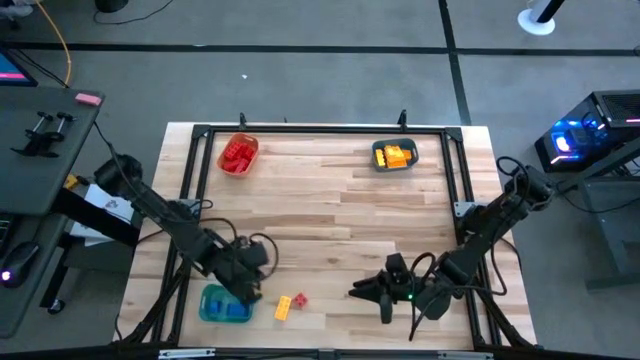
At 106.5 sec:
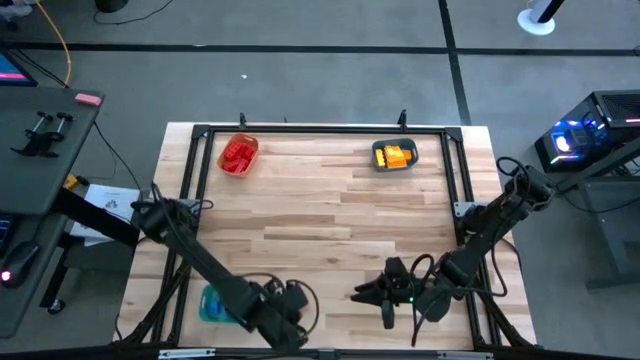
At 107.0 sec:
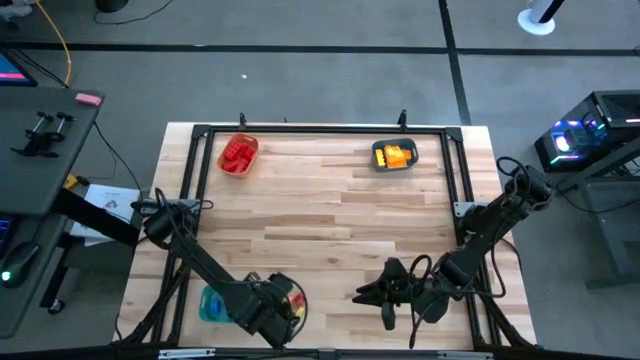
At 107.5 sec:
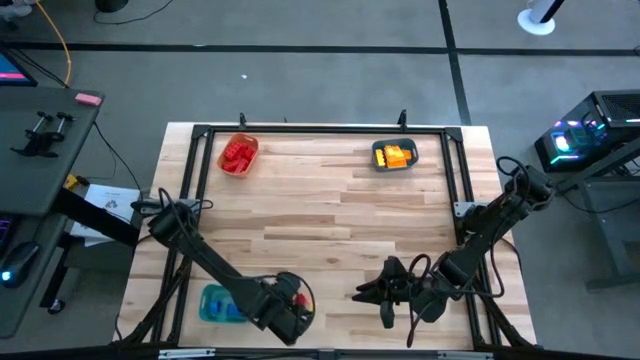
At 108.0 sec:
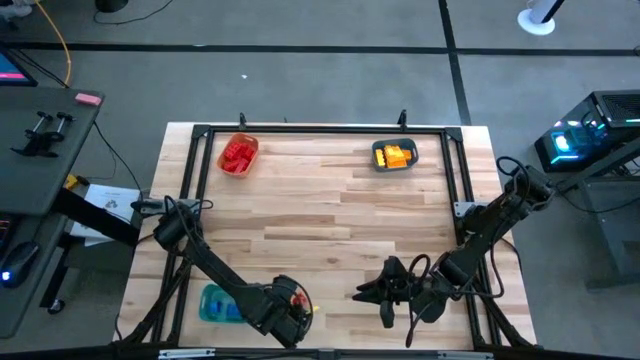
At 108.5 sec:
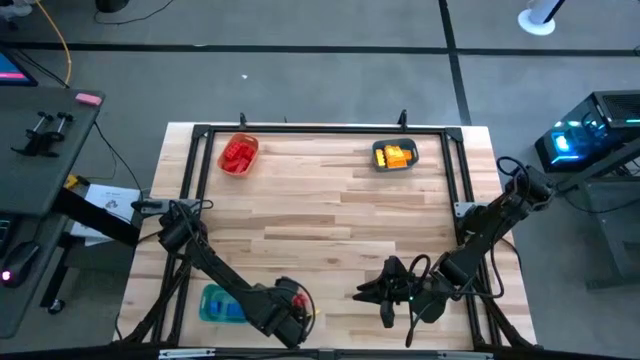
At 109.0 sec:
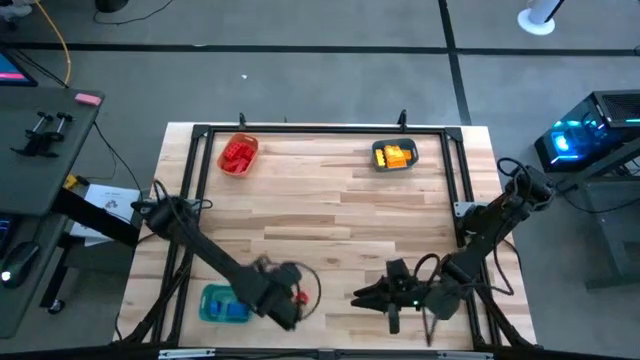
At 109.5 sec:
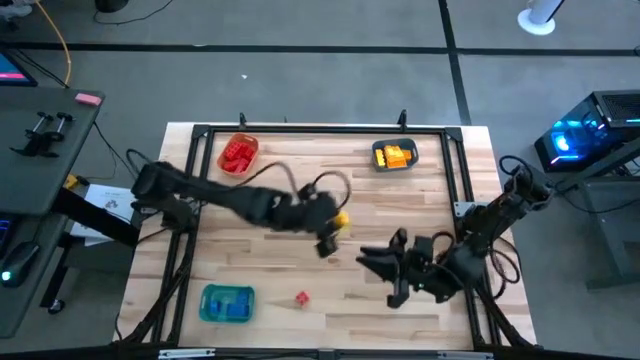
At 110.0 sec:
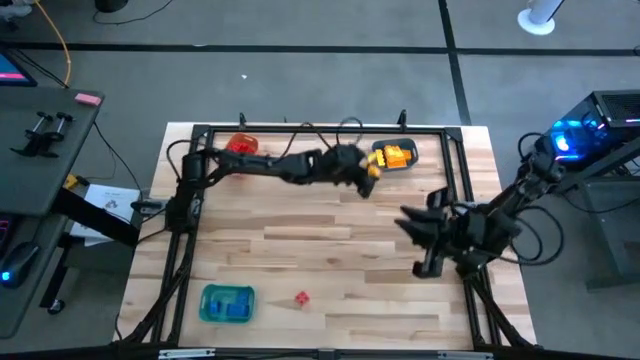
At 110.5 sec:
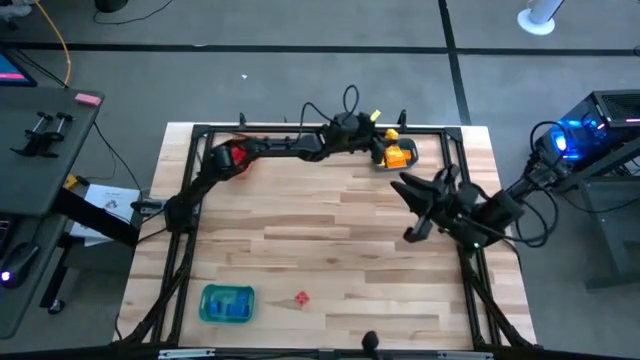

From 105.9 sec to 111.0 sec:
Task: Sort blocks
Put the yellow game piece into the blue bin

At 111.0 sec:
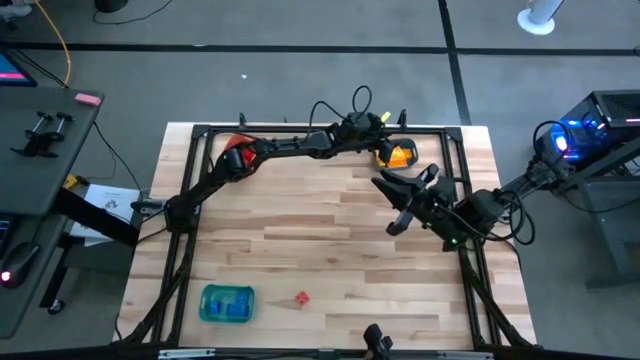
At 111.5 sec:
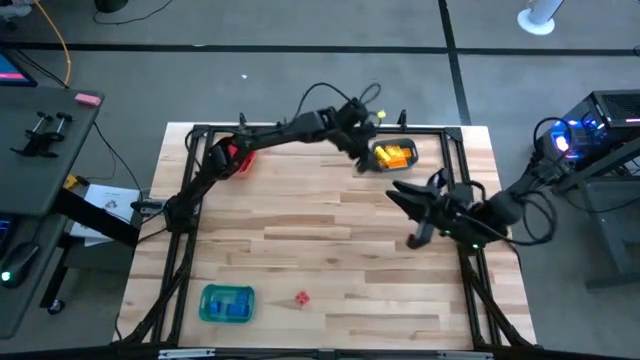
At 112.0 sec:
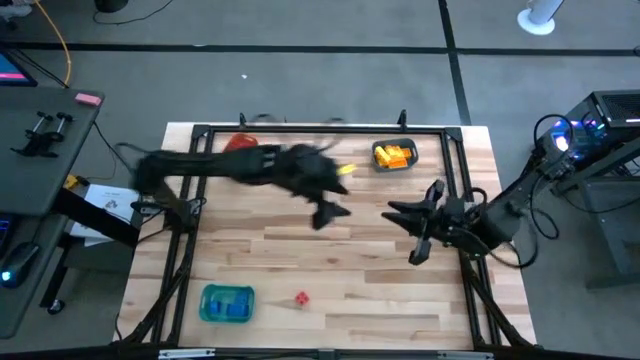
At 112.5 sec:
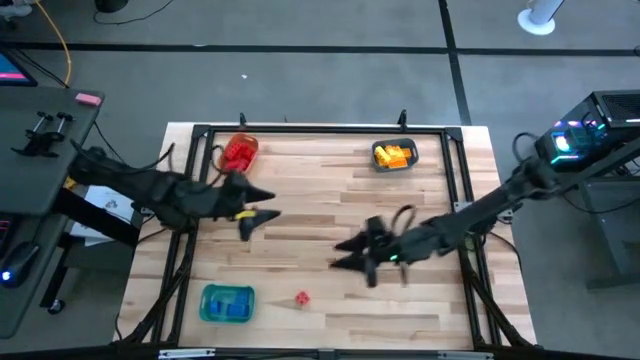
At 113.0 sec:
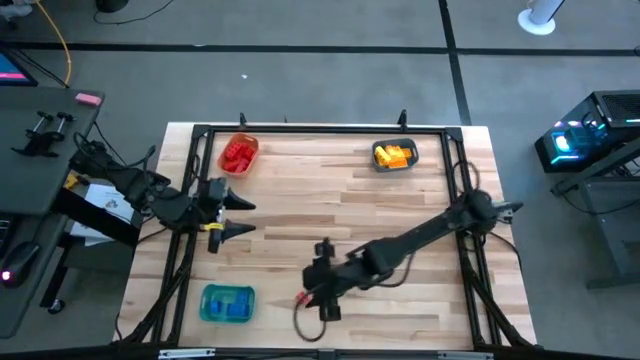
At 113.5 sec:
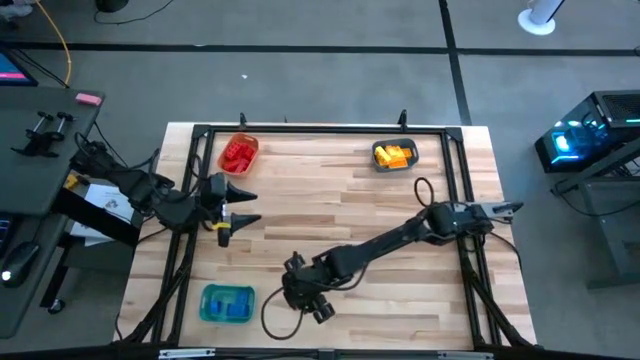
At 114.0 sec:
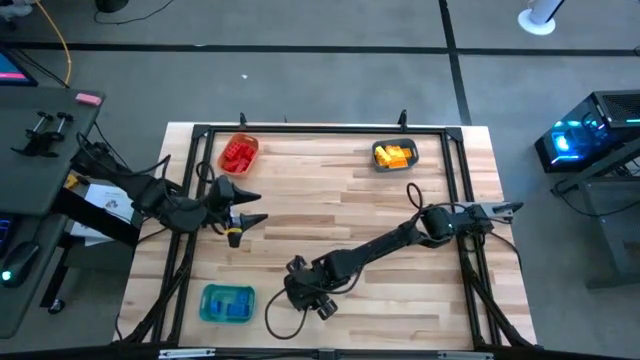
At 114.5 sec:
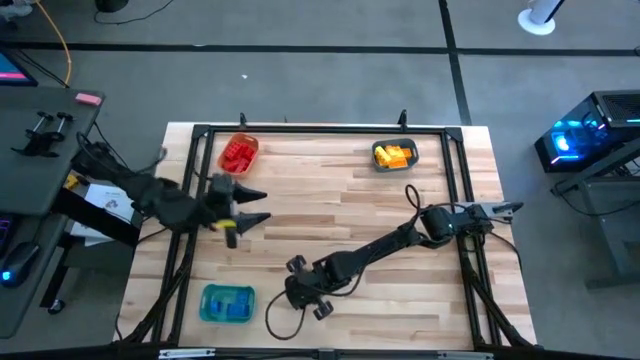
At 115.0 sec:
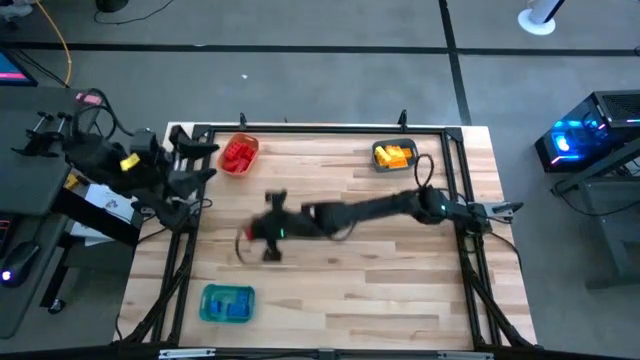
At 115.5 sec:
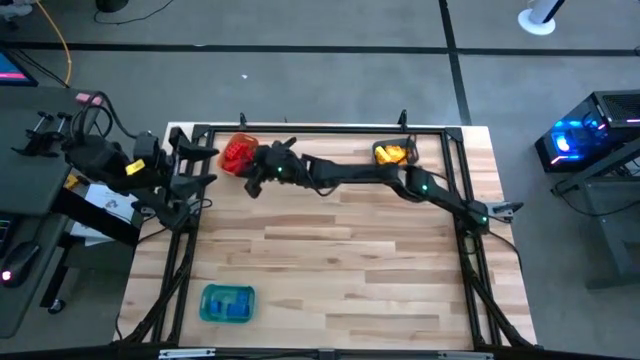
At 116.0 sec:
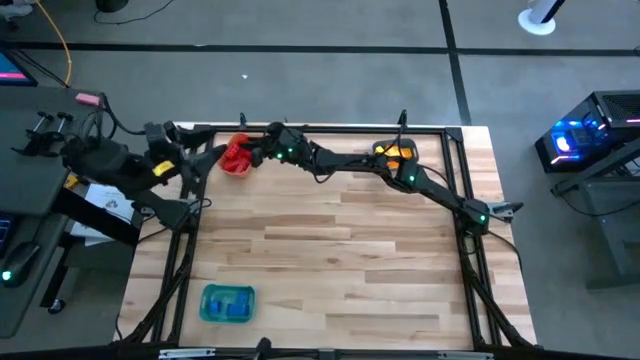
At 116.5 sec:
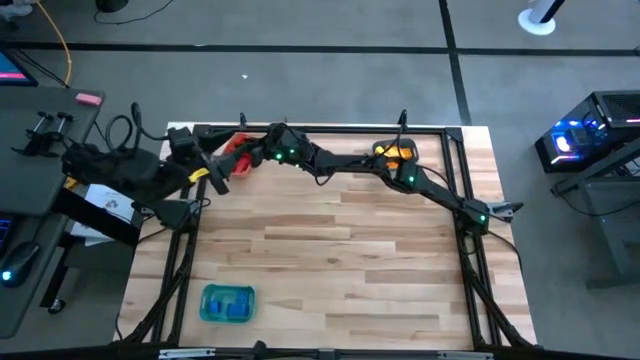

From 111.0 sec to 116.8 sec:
Put the red game piece into the orange bin

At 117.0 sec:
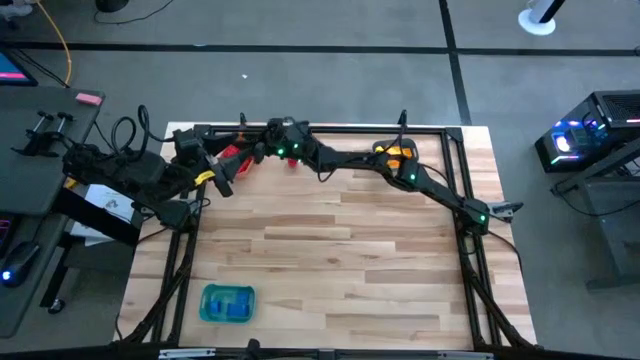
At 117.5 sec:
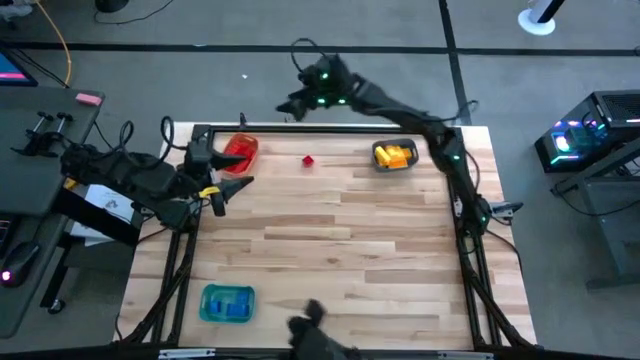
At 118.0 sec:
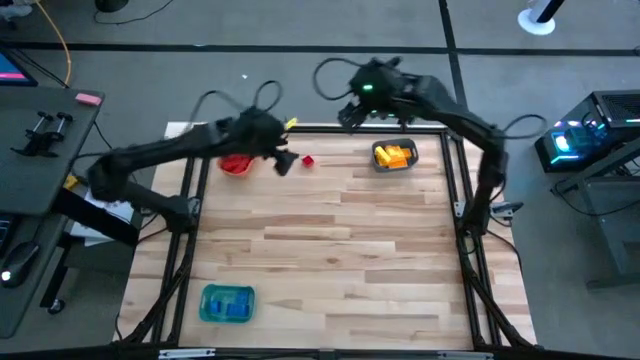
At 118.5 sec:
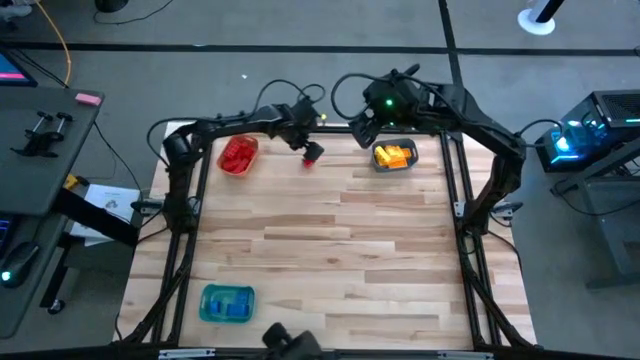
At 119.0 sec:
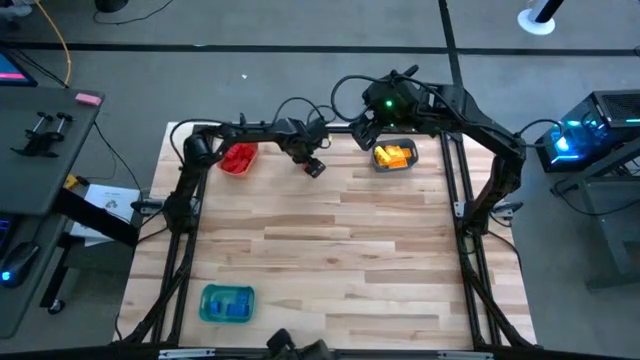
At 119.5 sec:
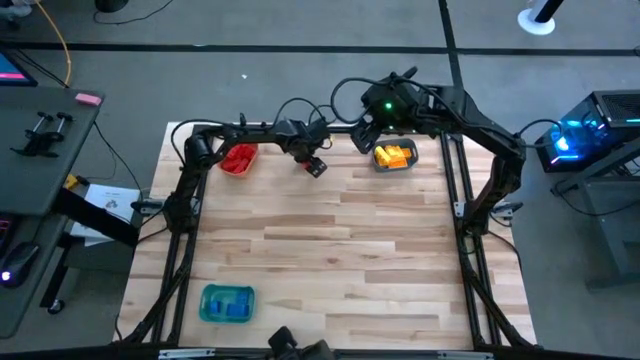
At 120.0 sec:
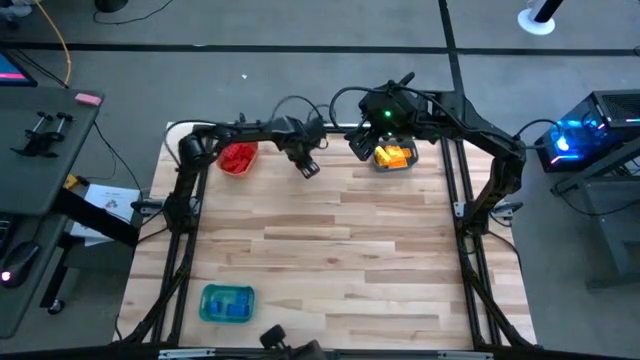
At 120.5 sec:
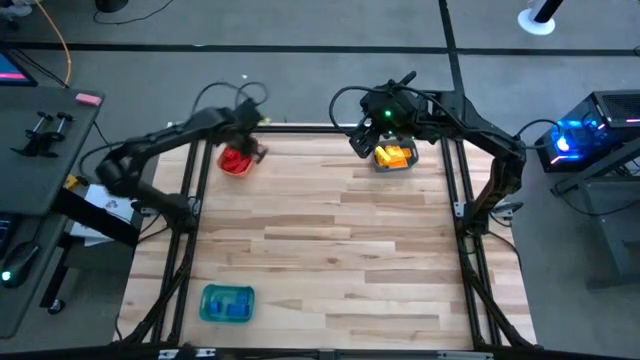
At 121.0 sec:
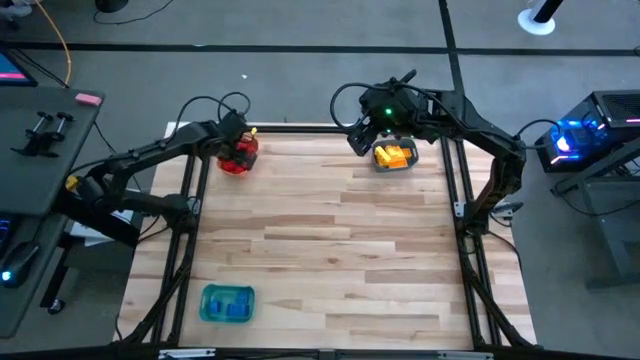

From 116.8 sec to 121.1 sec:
Put the red game piece into the orange bin

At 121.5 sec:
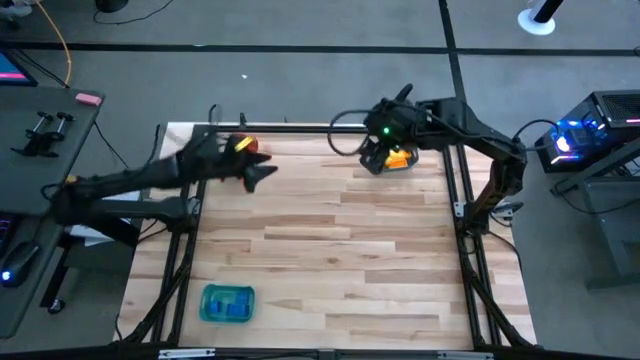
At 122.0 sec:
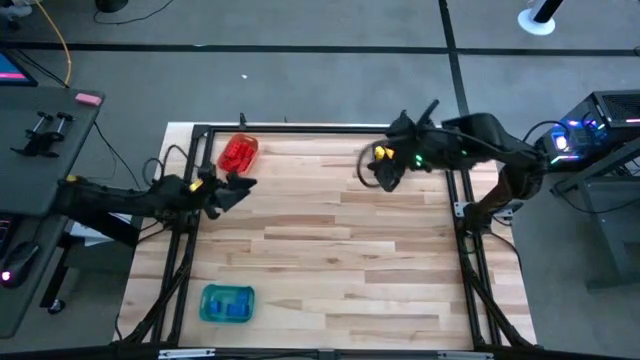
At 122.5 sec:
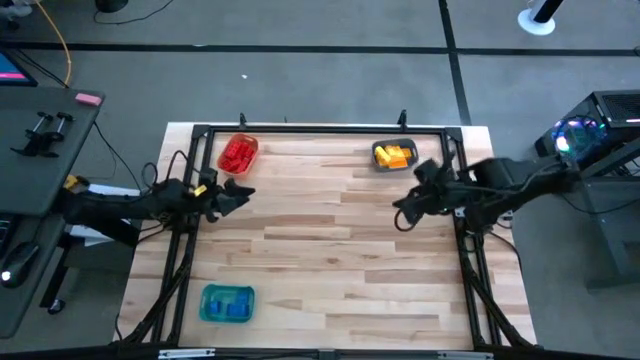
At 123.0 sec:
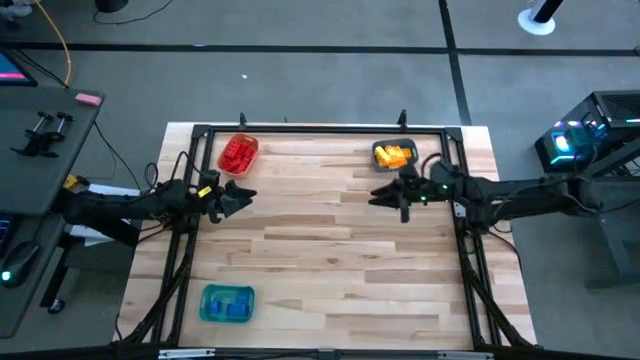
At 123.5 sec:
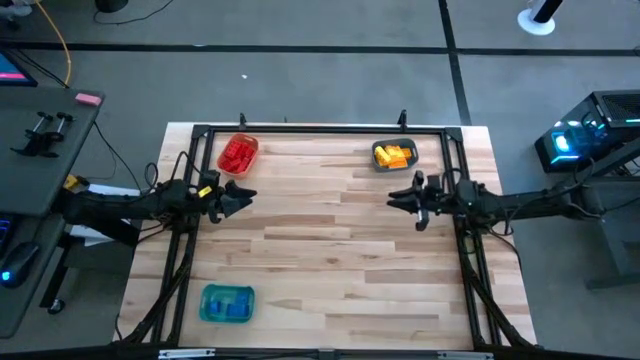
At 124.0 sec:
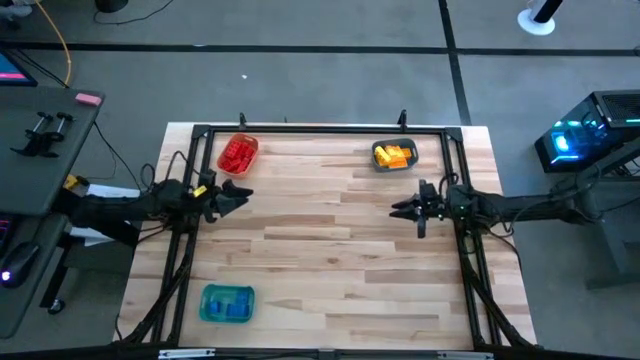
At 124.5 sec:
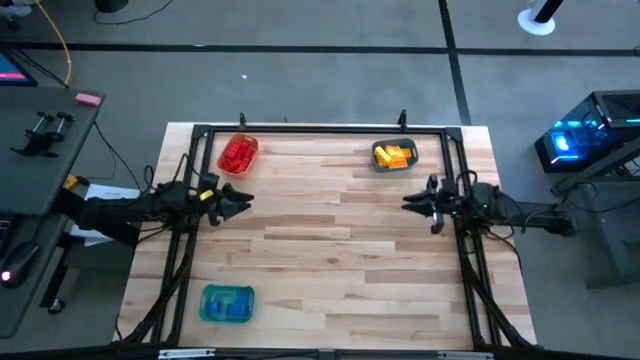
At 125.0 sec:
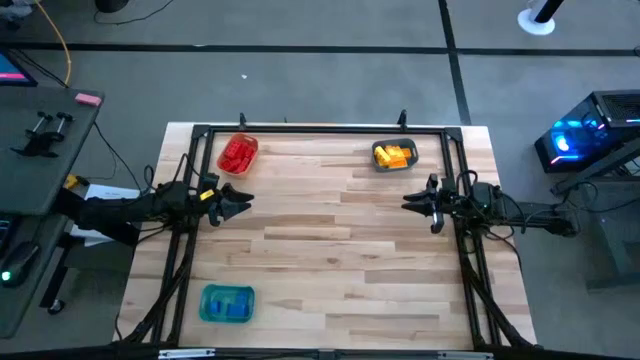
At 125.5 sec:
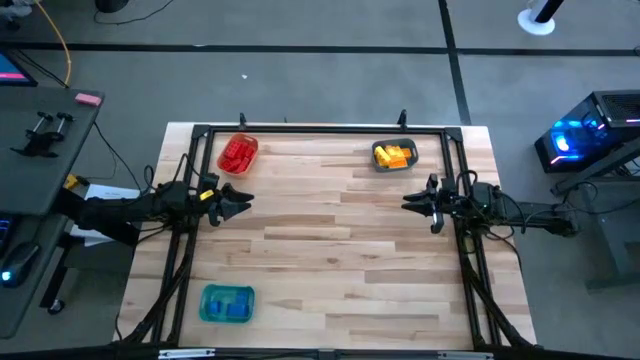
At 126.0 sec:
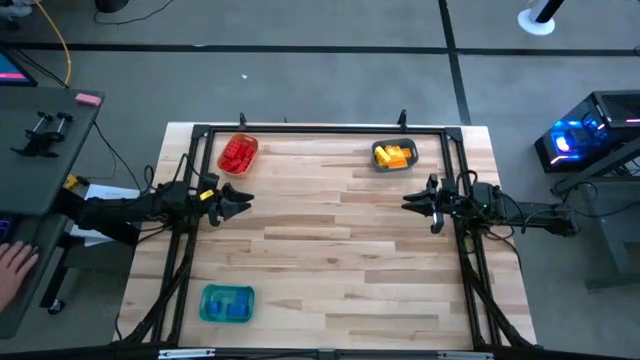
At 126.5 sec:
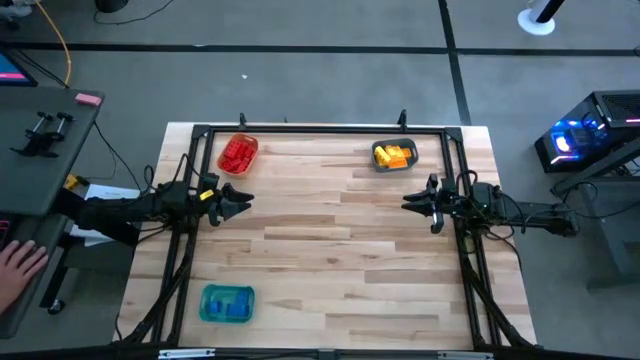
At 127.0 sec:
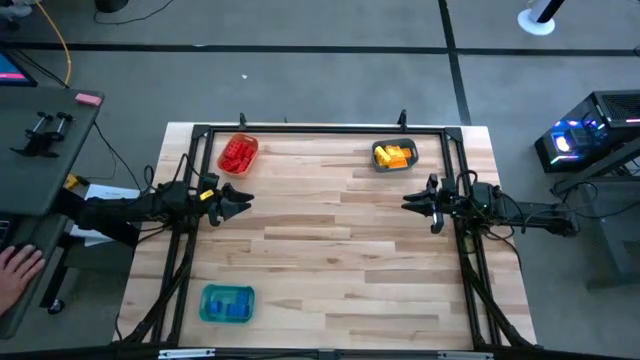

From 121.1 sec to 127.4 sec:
Return to Home Position
